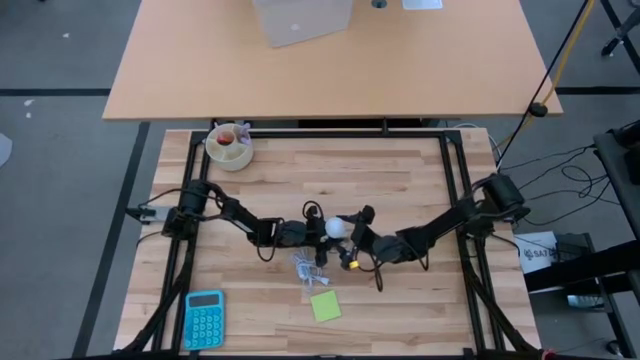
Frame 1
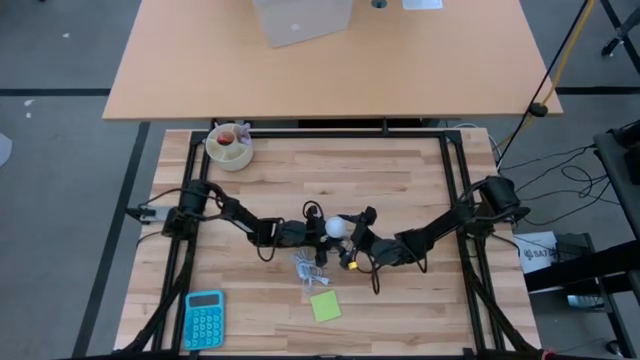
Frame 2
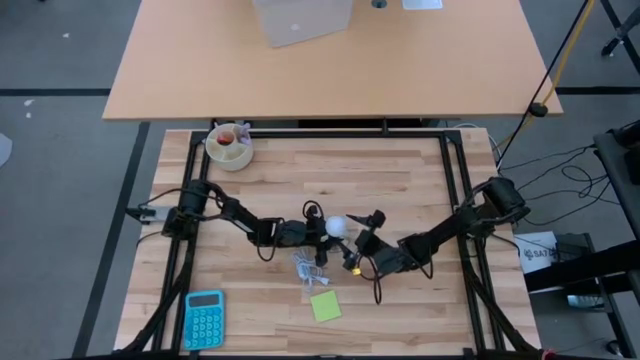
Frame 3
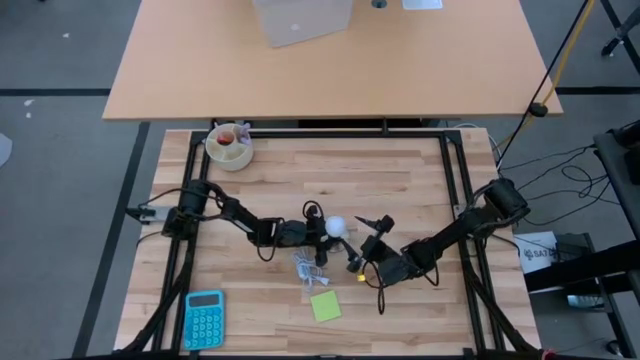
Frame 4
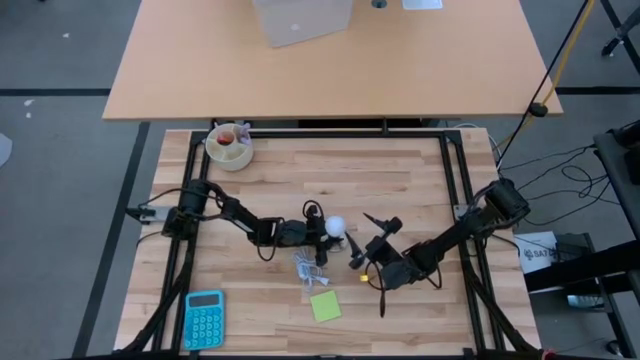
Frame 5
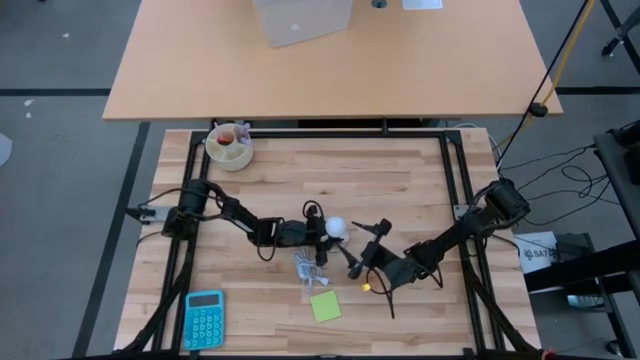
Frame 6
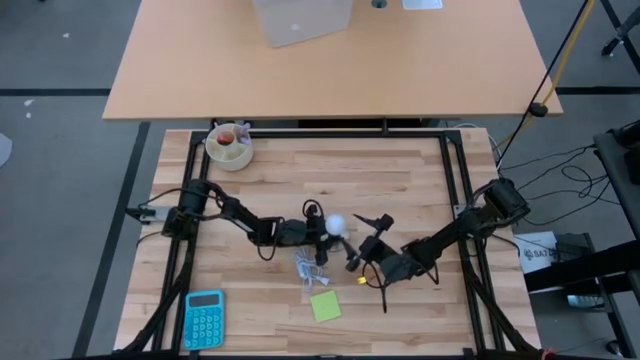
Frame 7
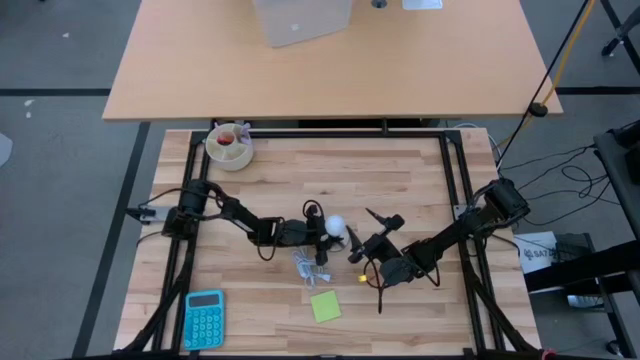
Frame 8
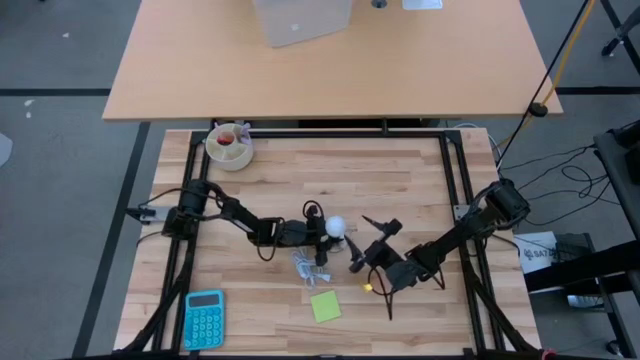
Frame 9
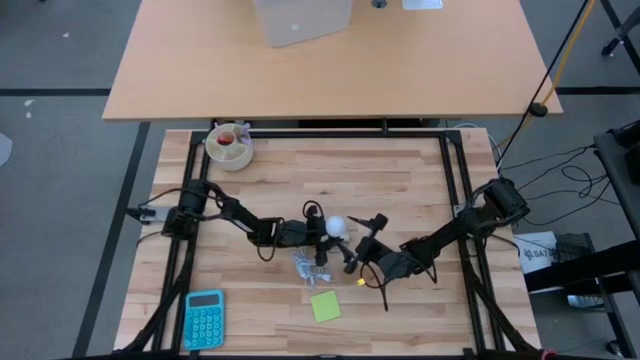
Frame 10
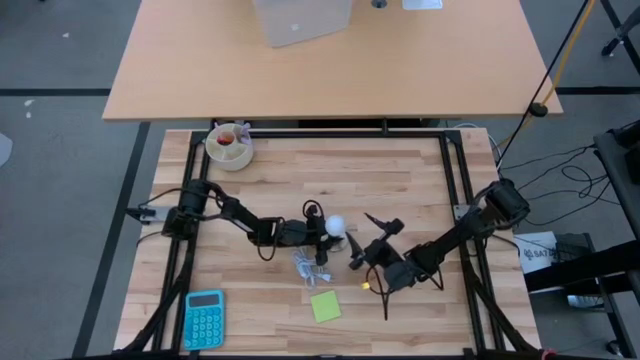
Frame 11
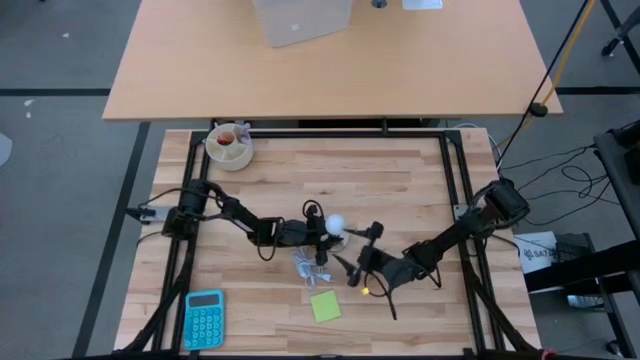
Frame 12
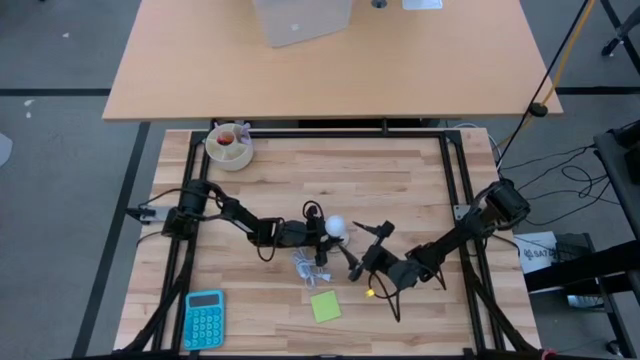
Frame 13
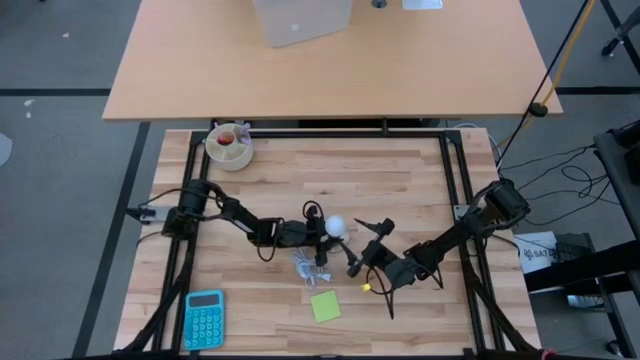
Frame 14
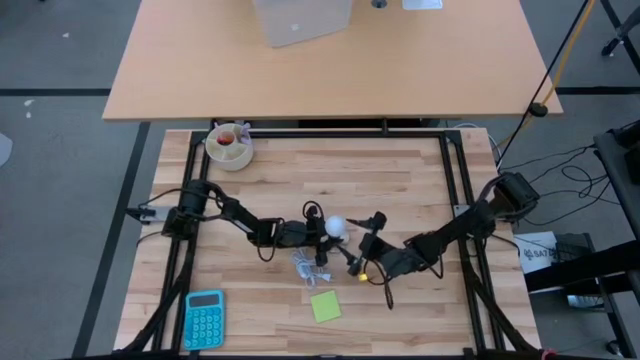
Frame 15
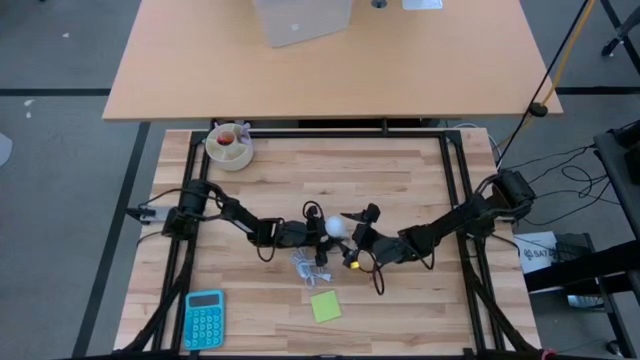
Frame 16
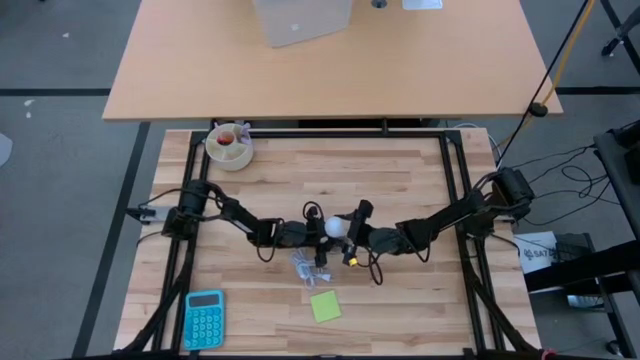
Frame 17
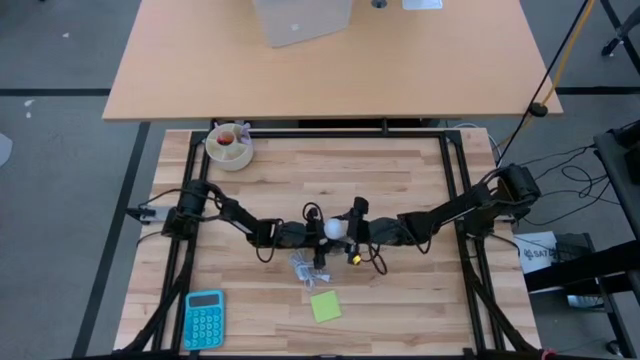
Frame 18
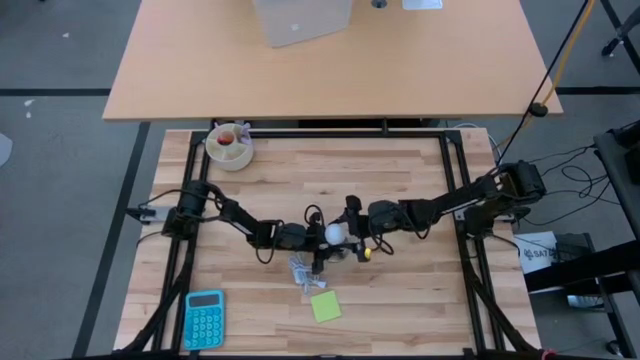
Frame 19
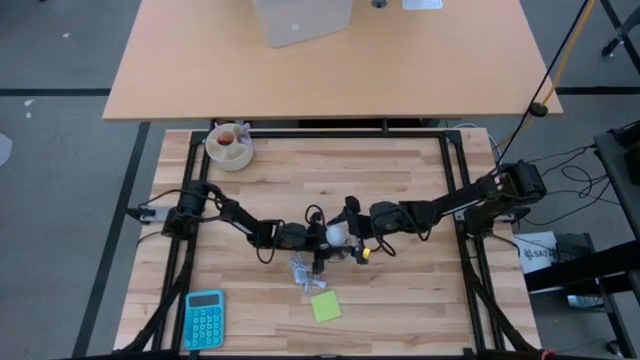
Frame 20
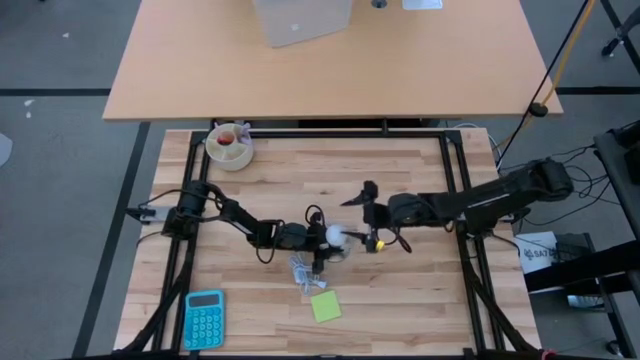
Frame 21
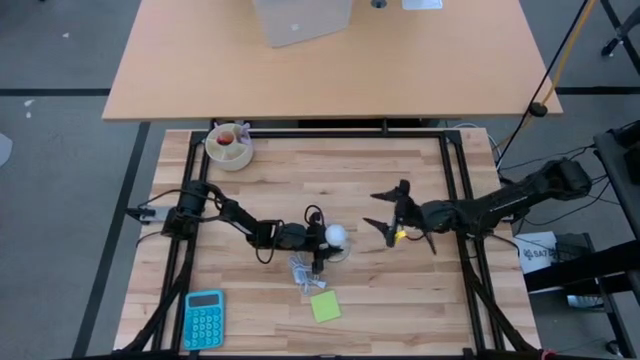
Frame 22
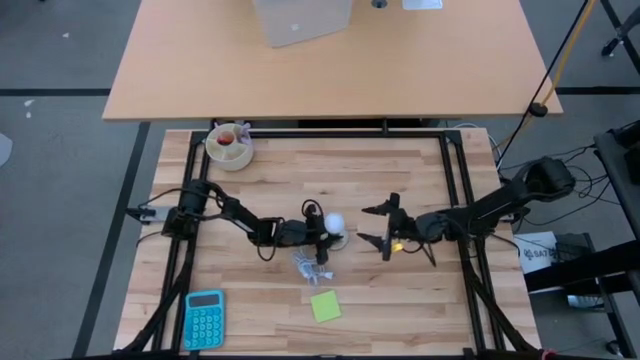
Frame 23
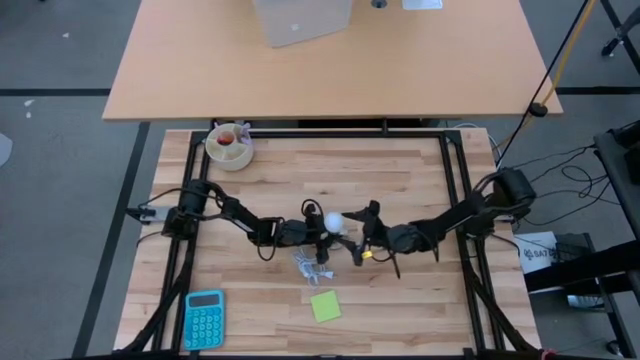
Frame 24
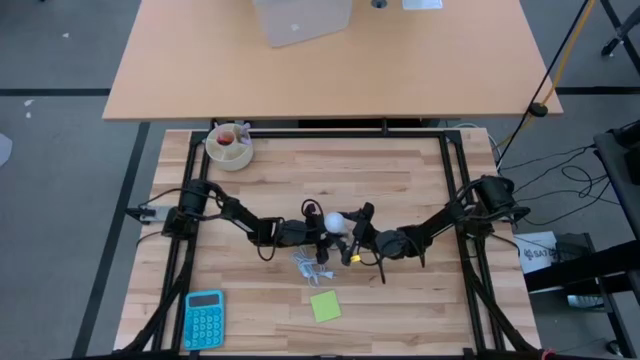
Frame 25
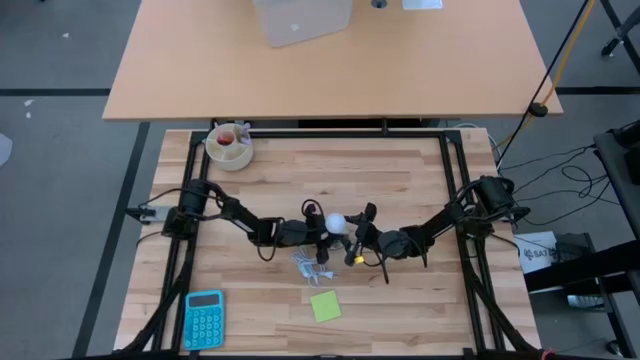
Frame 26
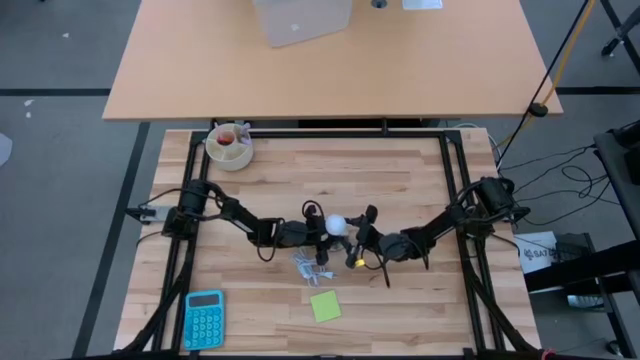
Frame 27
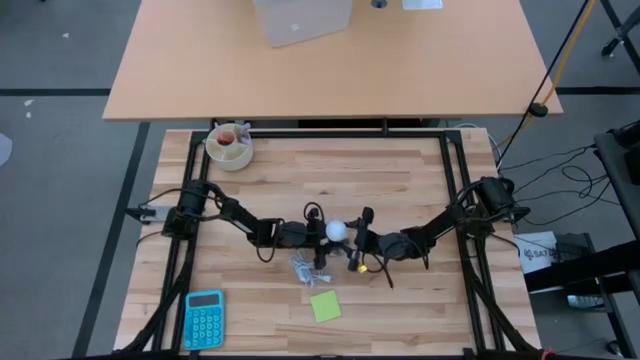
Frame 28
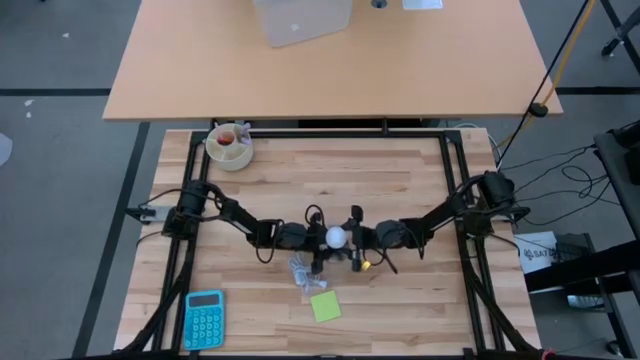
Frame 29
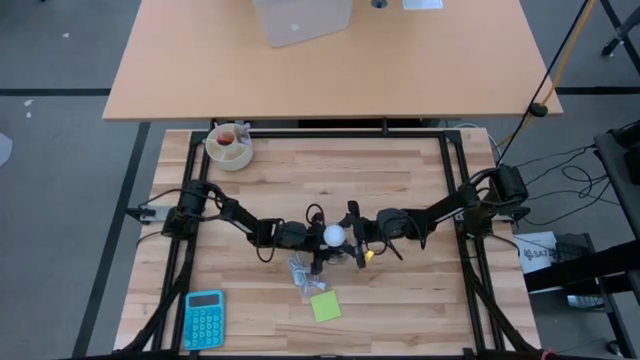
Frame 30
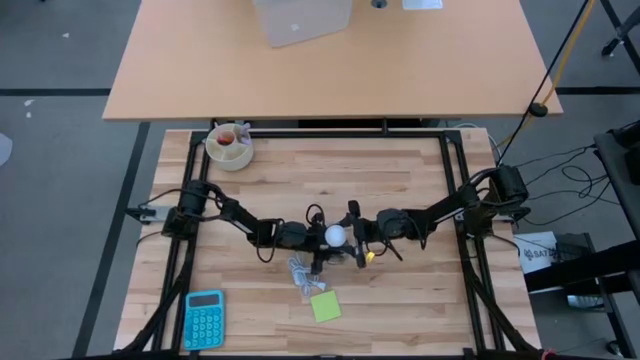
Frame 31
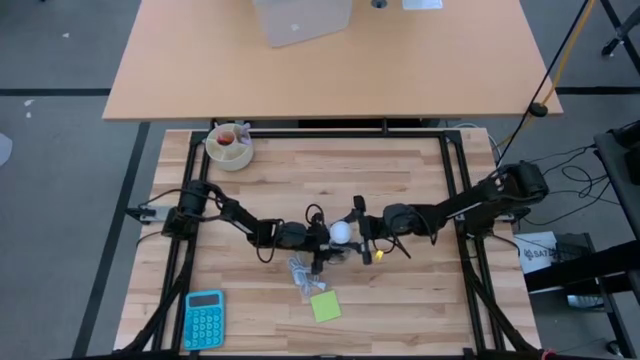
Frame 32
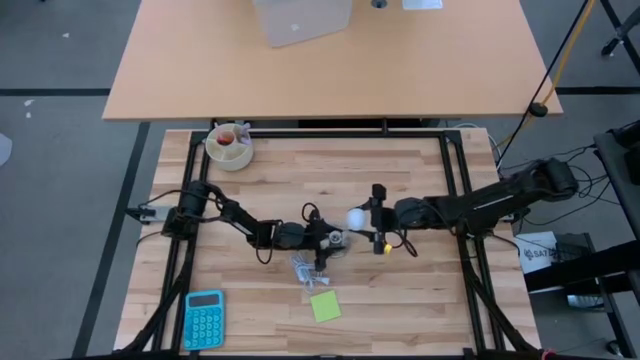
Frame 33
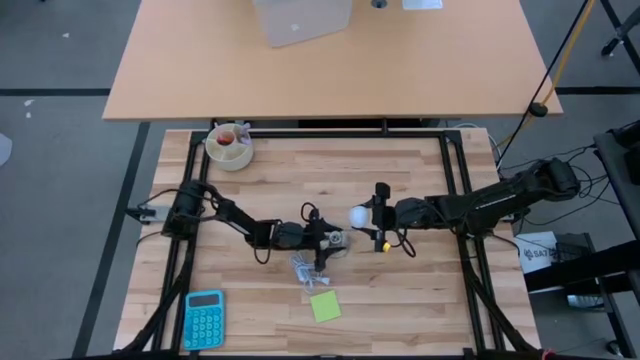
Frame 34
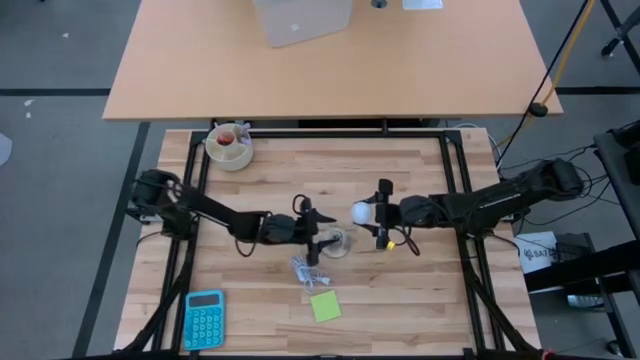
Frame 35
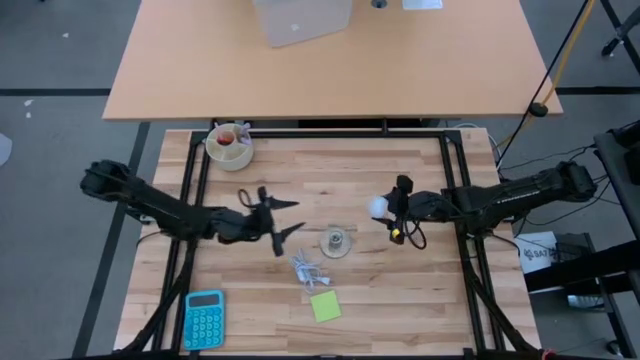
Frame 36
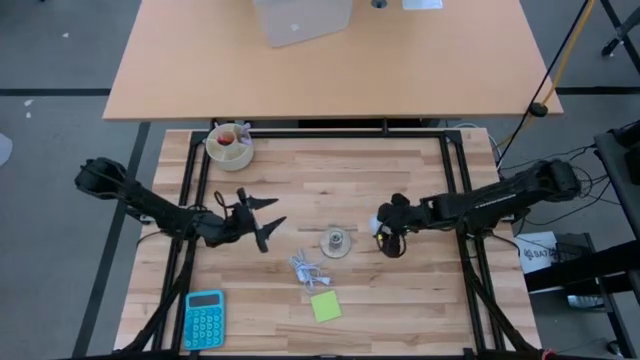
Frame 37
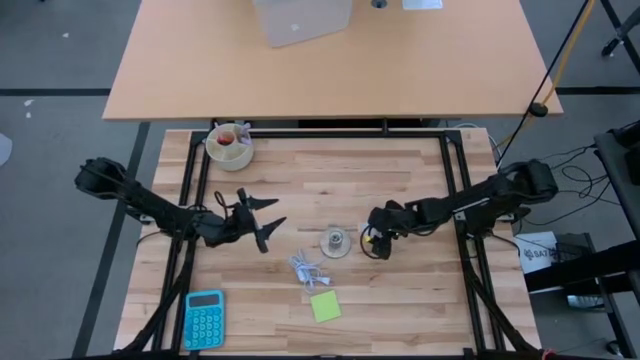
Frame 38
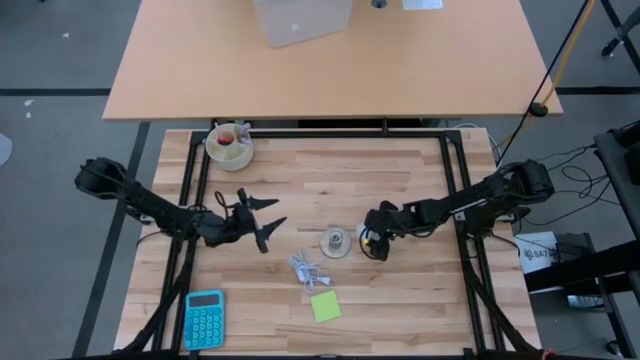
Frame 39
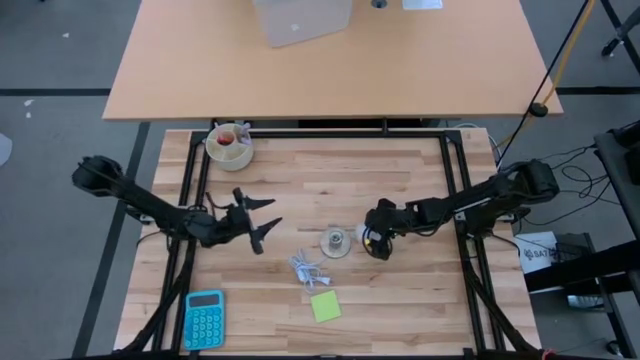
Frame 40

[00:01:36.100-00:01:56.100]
Task: Screw lightbulb
Remove the lightbulb from the lamp

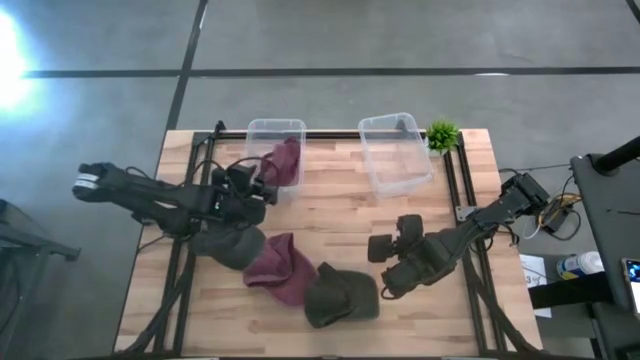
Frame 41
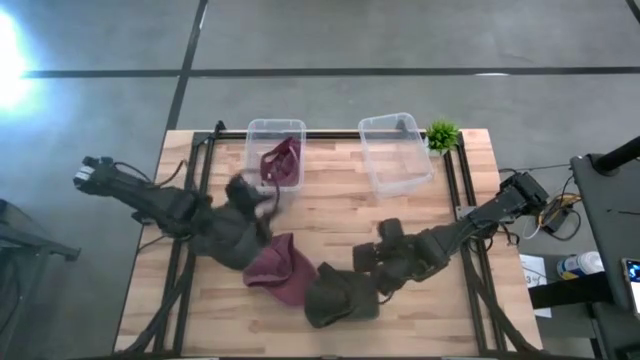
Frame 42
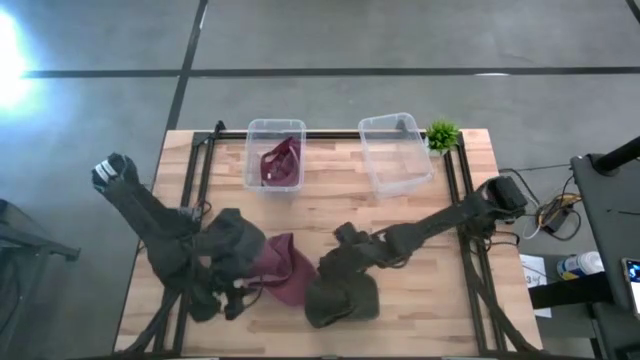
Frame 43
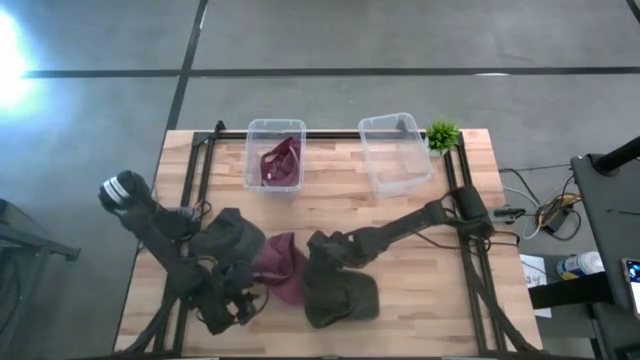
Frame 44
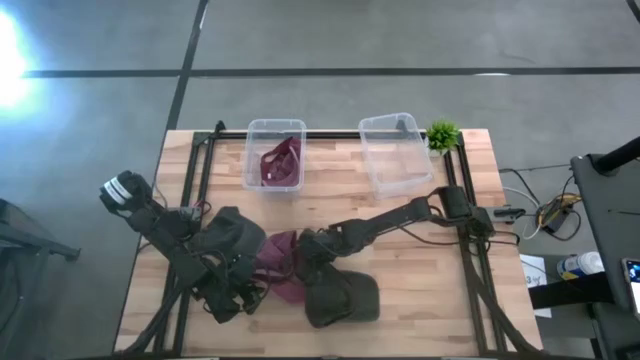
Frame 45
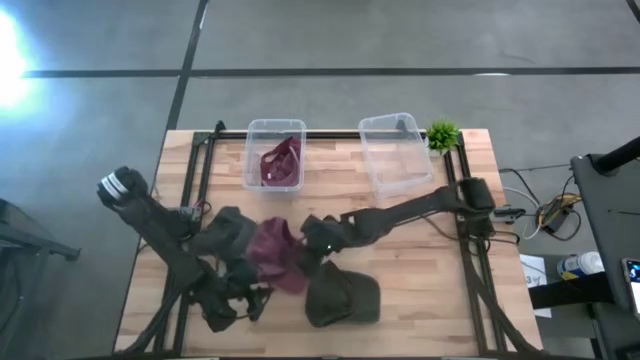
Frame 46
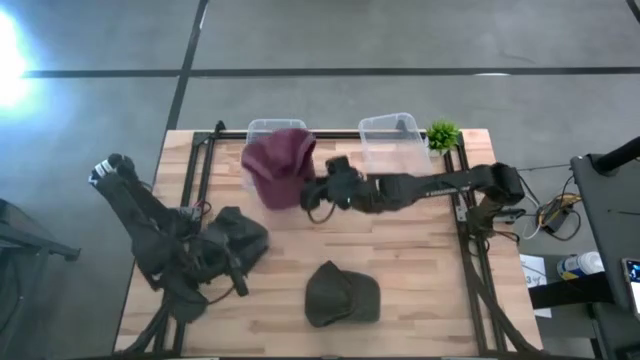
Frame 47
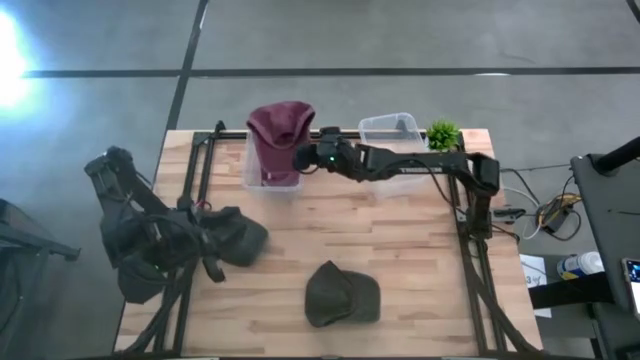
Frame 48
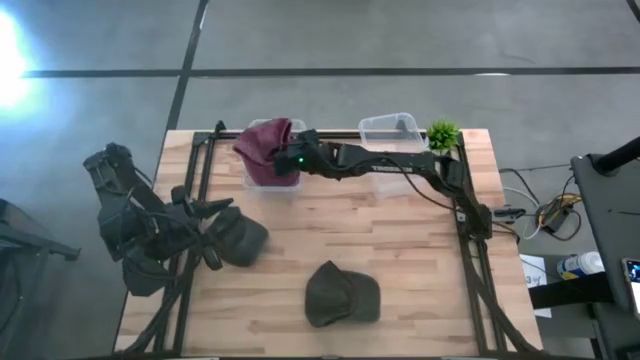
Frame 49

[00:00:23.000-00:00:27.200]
Task: Pick & Place hat
Put the red cap into the left transparent bin
